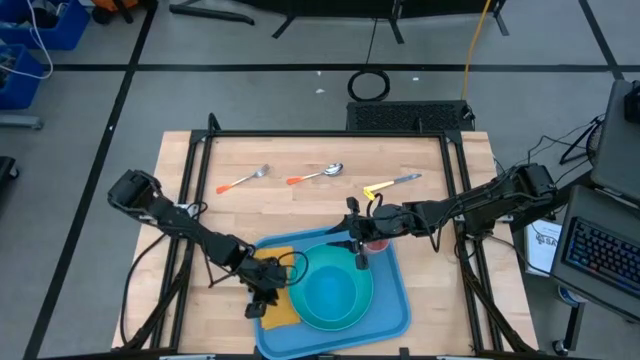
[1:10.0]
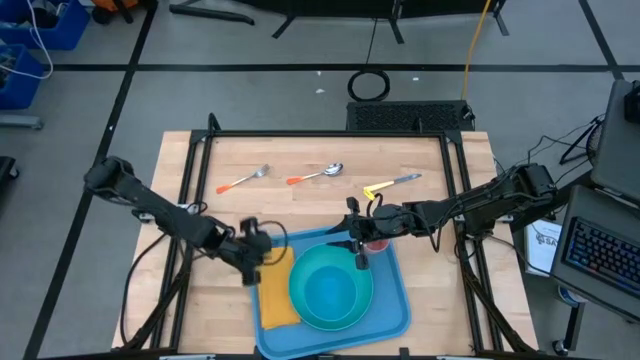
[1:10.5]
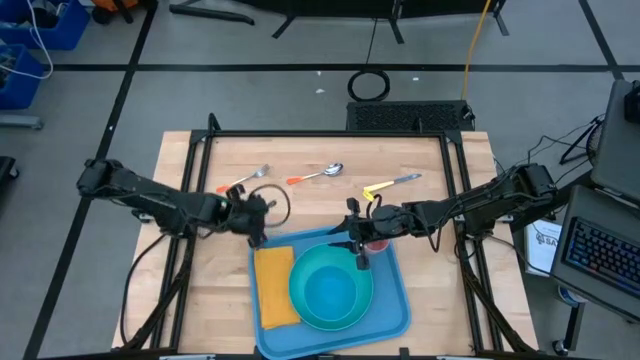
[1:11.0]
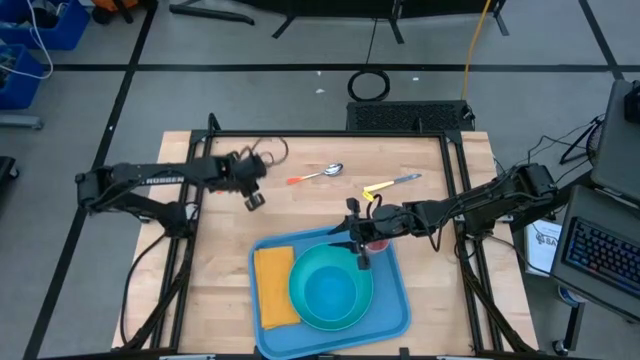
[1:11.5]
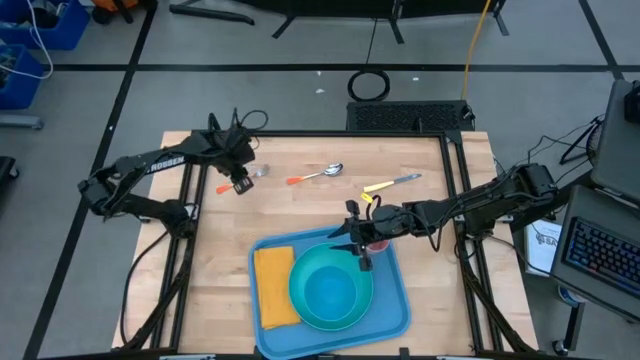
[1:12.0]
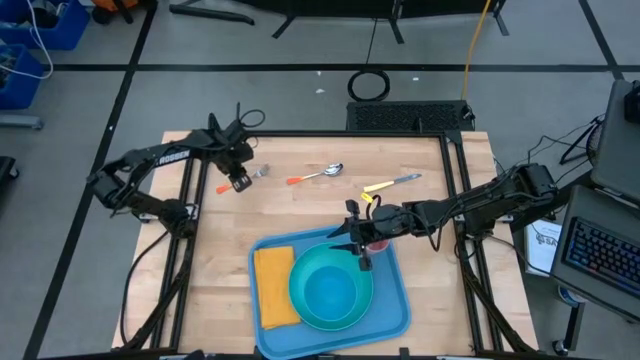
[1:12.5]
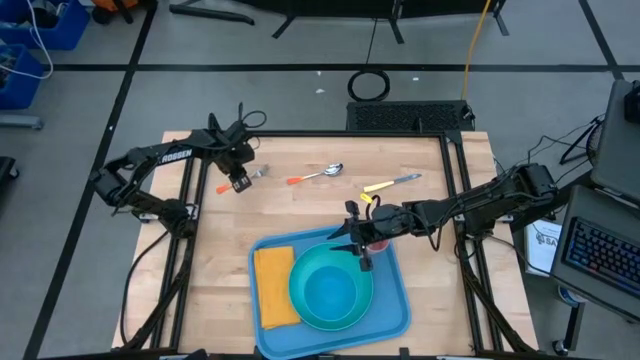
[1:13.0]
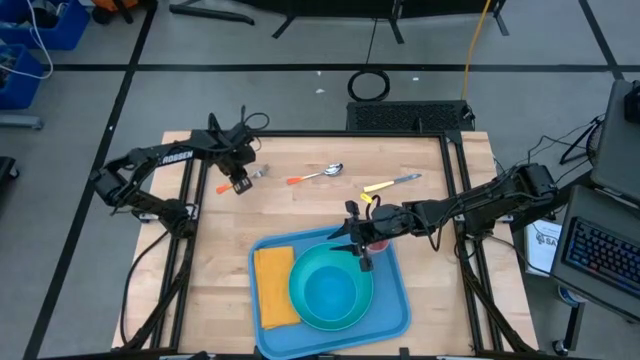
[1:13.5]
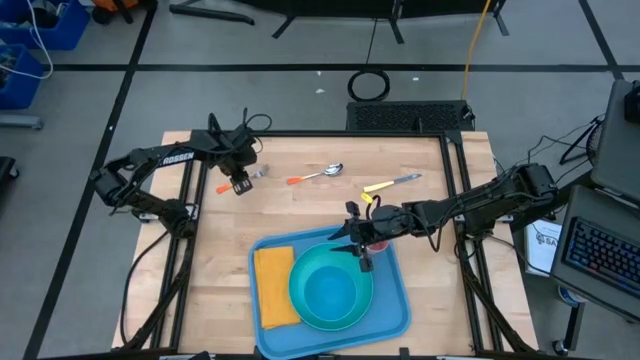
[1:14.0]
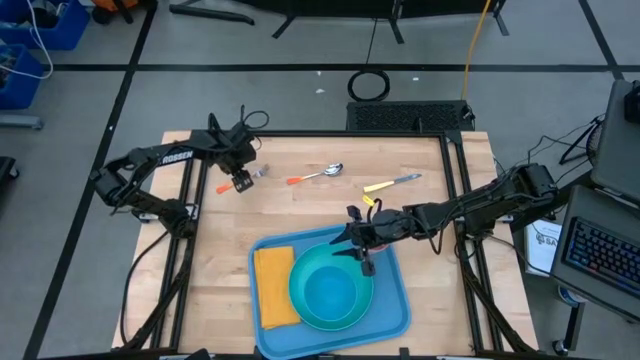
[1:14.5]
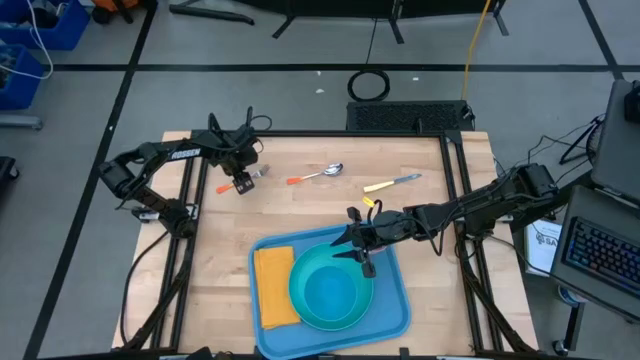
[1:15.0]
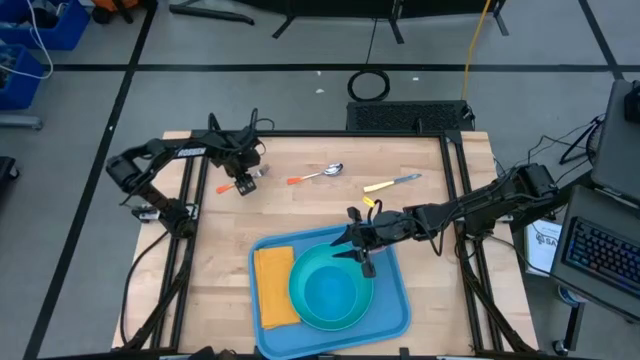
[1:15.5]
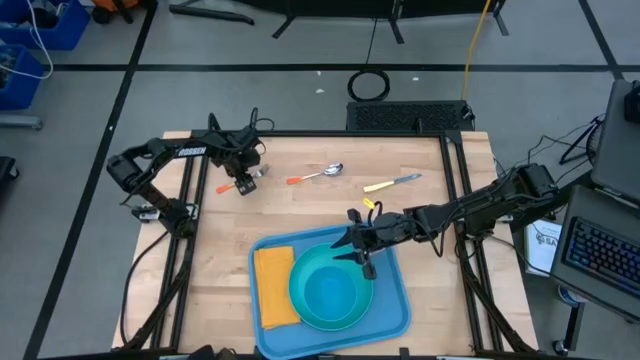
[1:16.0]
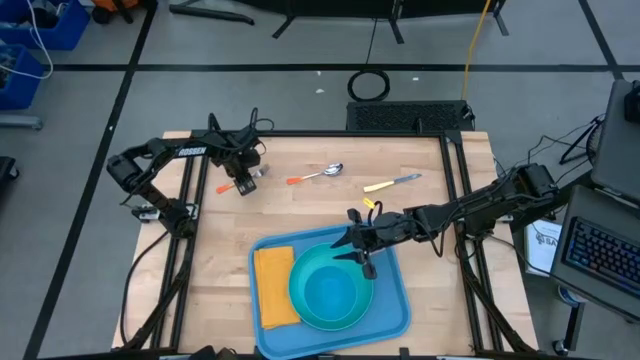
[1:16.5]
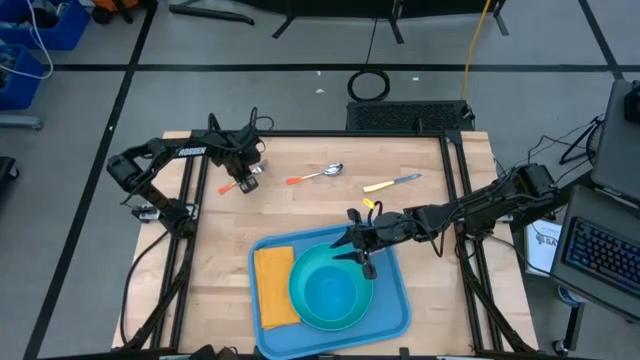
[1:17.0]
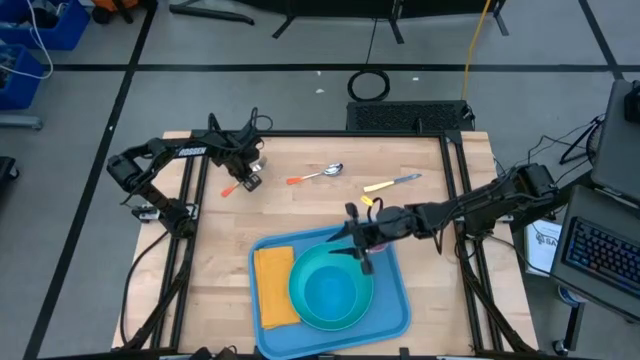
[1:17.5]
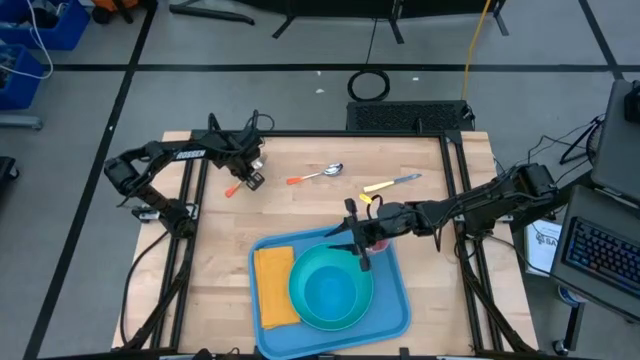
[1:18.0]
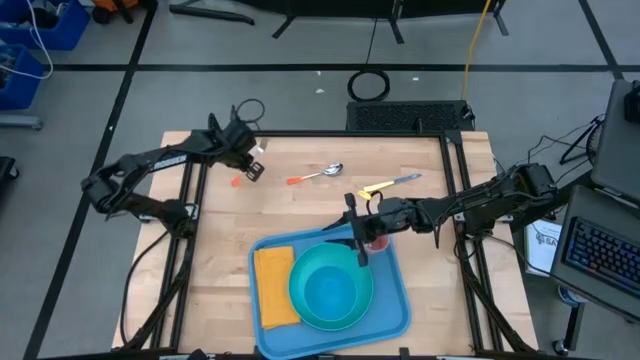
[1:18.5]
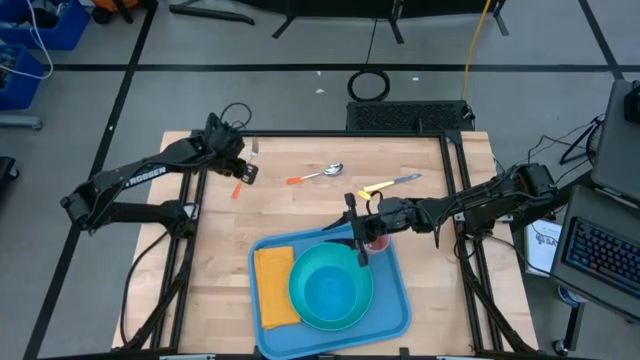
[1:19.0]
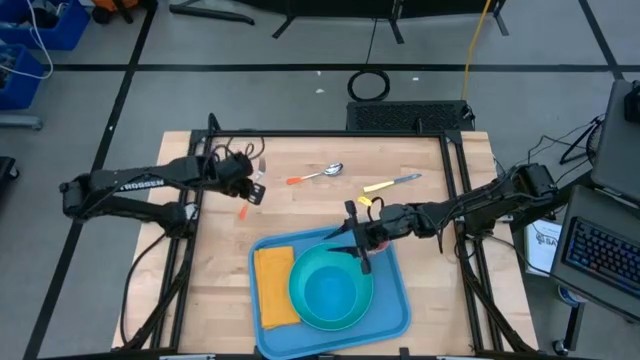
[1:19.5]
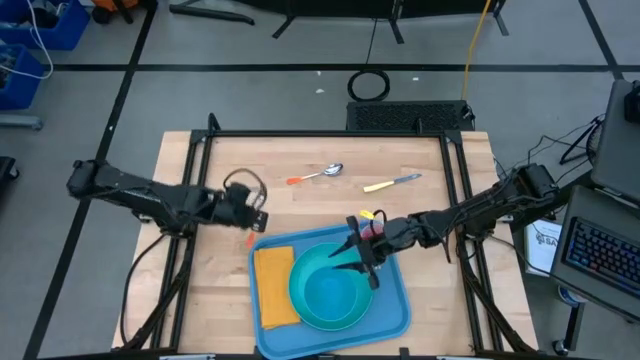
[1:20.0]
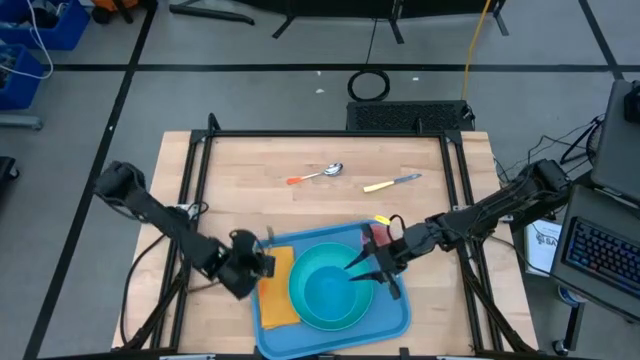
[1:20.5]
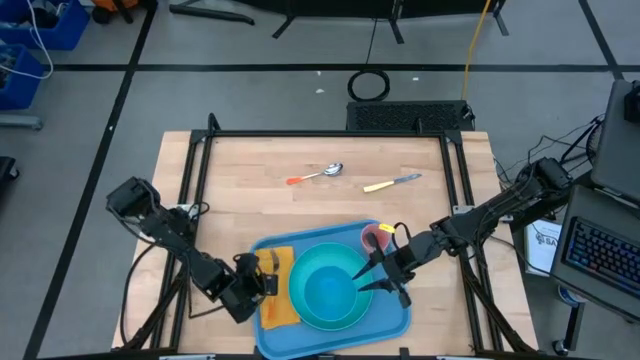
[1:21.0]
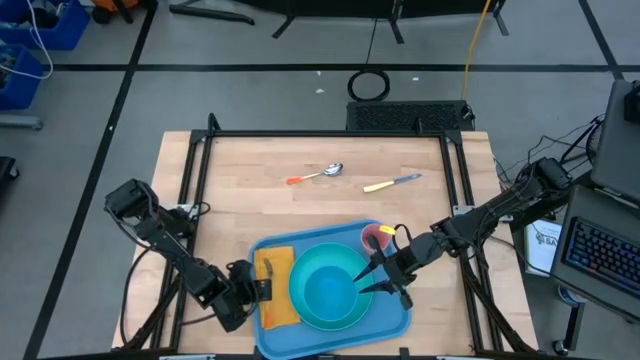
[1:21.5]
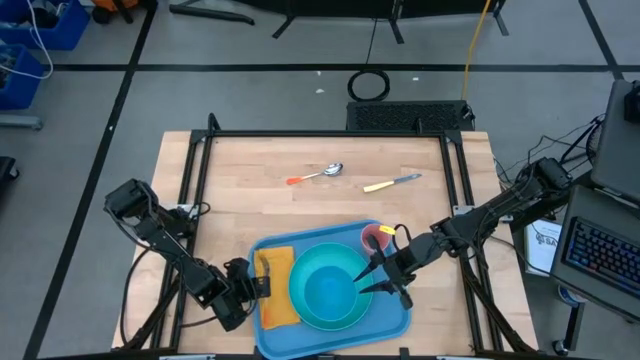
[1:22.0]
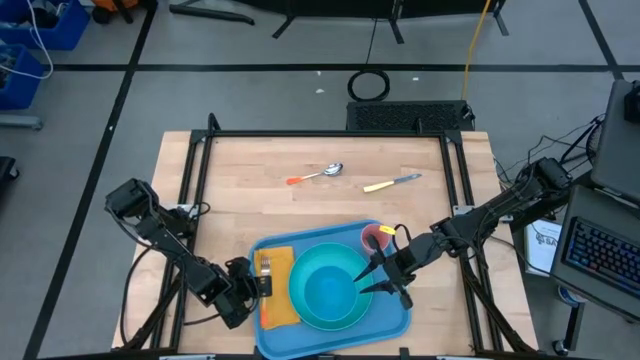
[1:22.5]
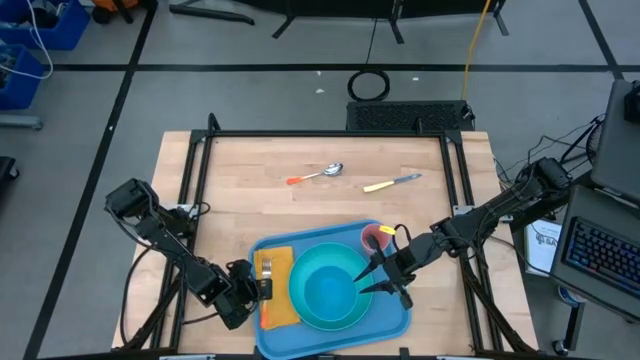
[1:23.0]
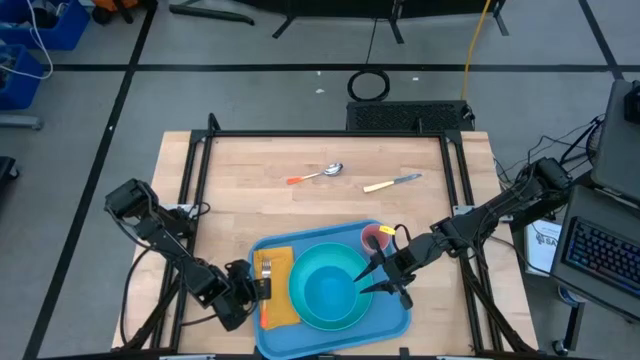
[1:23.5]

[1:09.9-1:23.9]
Task: Set up tray
Put the fork on top of the napkin

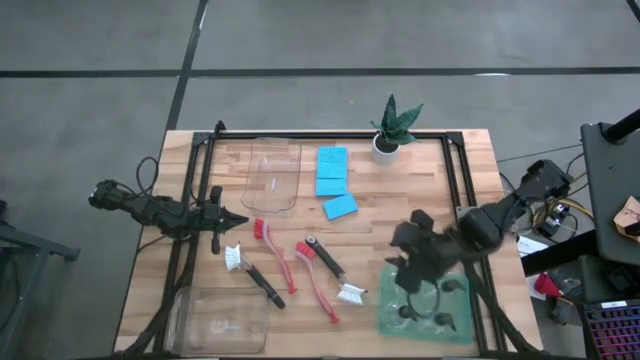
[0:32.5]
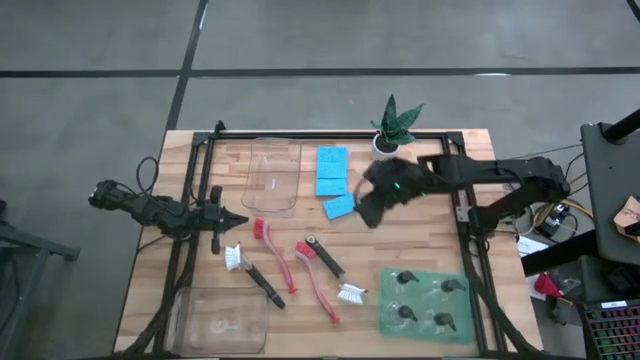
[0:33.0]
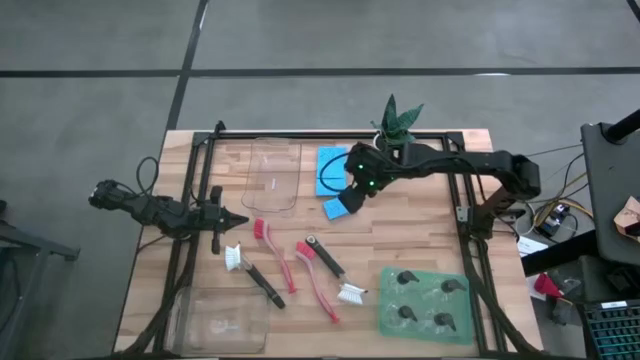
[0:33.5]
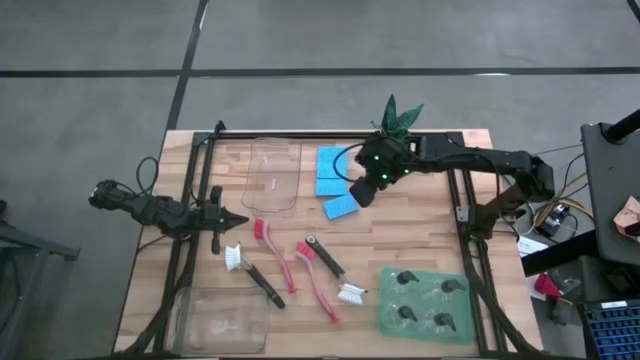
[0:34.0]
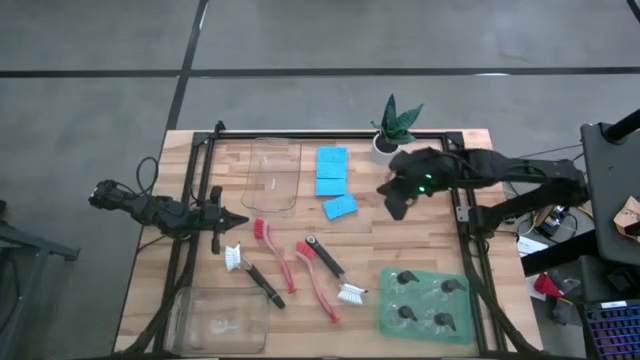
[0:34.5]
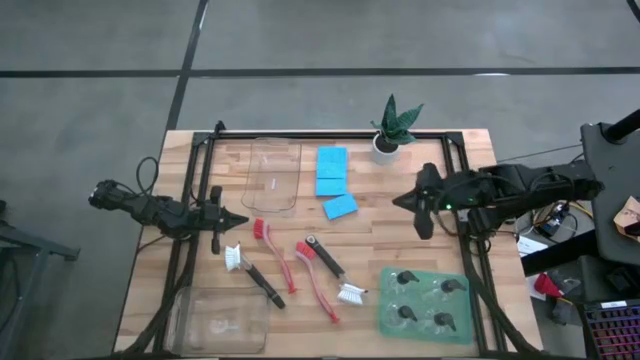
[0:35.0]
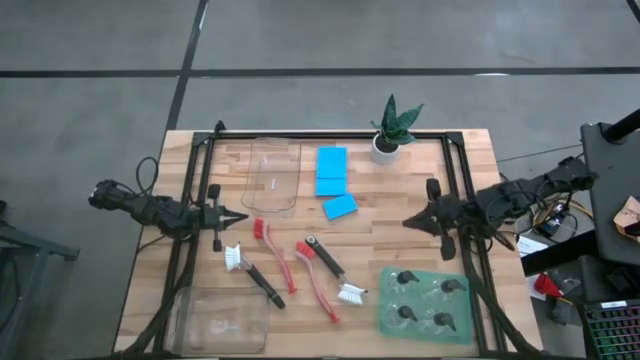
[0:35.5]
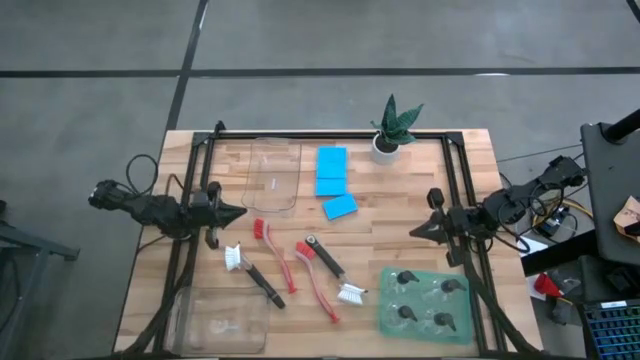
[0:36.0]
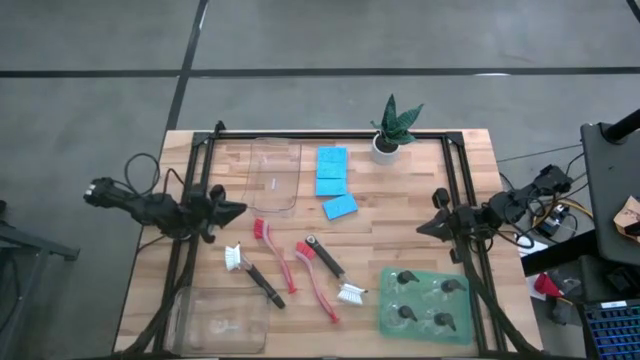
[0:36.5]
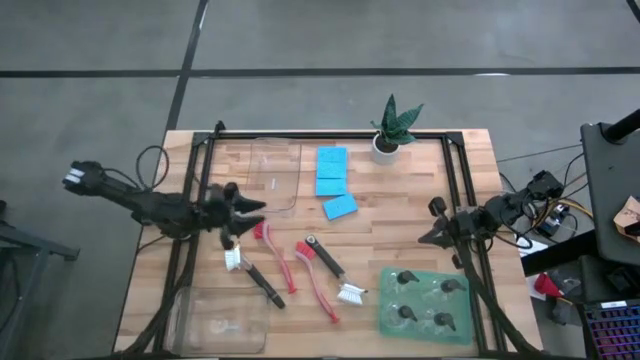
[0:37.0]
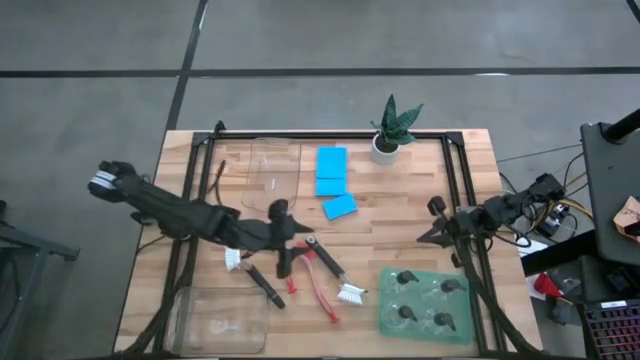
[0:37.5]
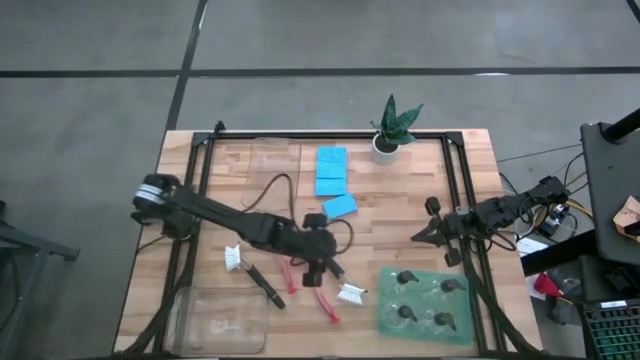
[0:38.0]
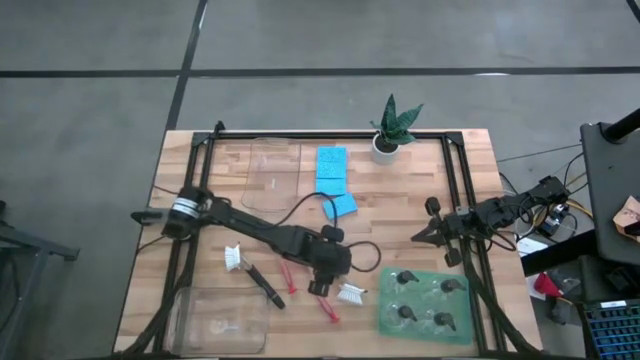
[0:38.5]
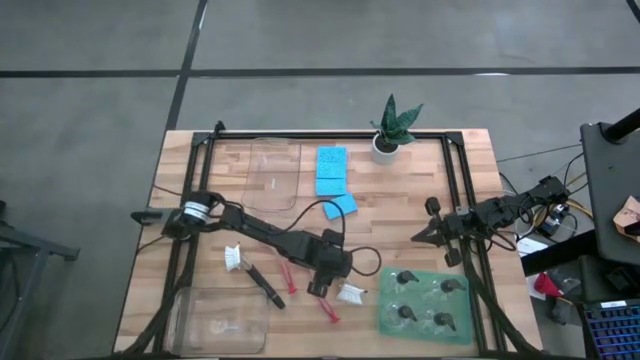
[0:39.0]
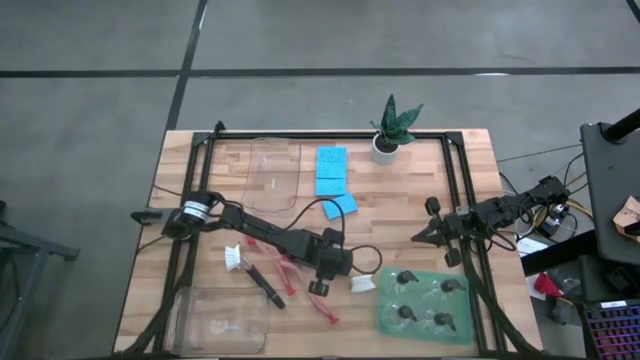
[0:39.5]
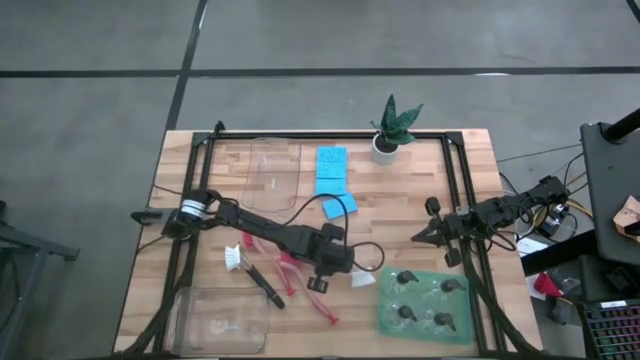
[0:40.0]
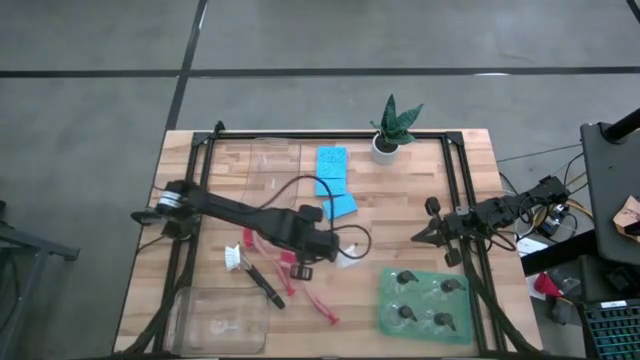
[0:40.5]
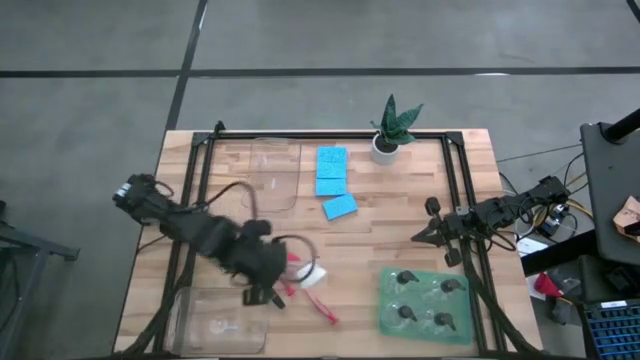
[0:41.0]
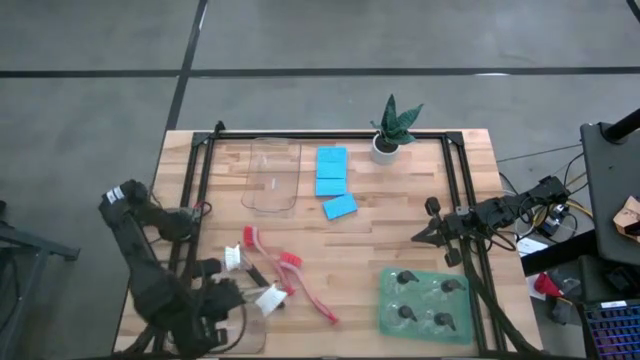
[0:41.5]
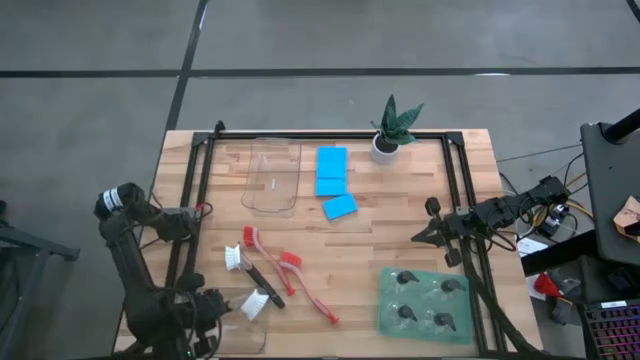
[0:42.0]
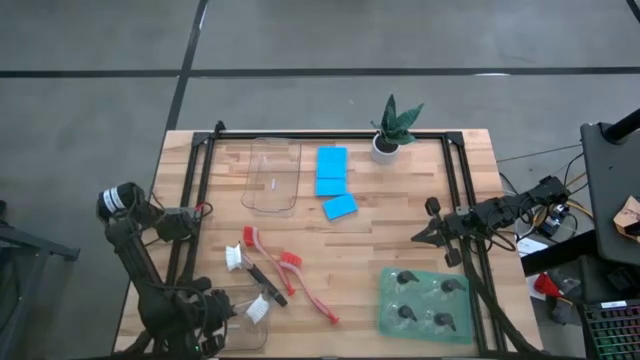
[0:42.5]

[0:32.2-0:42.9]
Task: Pick & Place Kitchen Sink Supplies
Put the black dish brush into the bottom transparent bin
